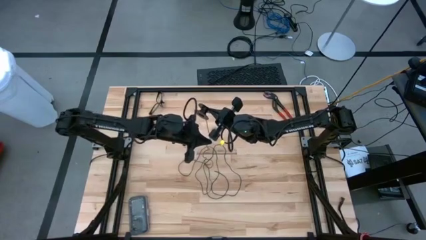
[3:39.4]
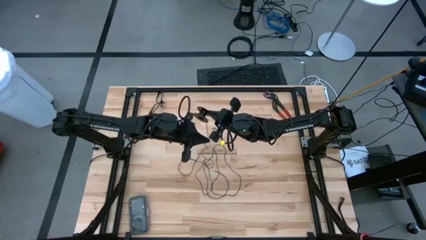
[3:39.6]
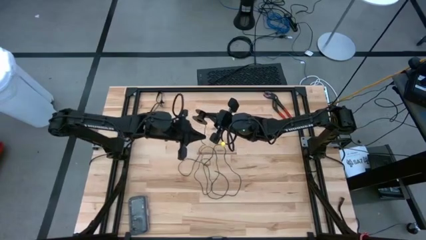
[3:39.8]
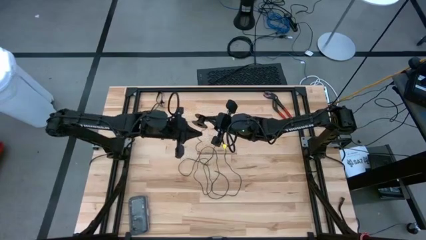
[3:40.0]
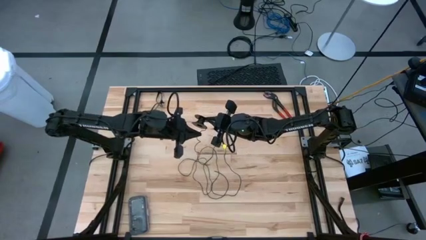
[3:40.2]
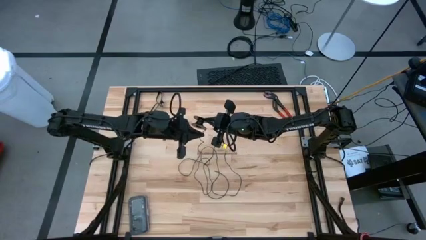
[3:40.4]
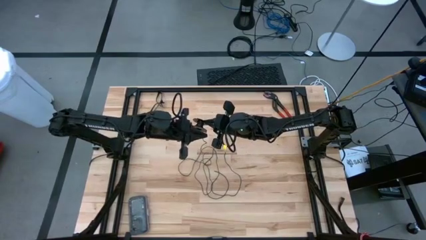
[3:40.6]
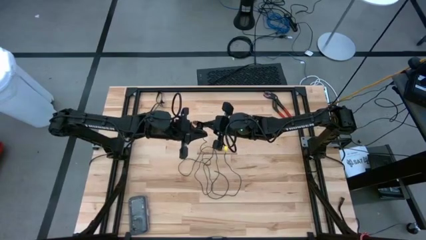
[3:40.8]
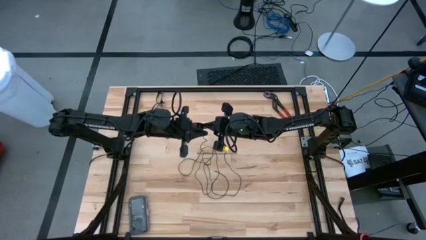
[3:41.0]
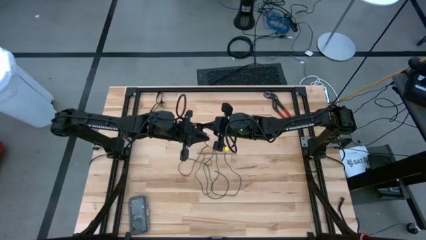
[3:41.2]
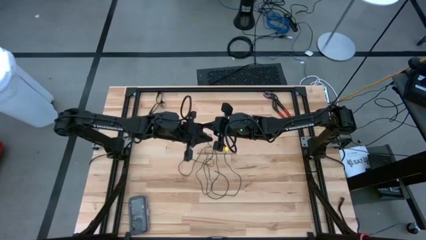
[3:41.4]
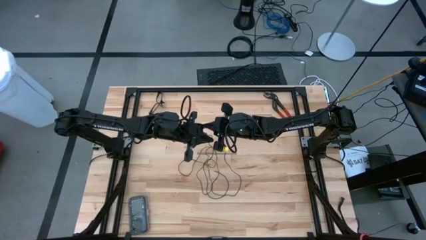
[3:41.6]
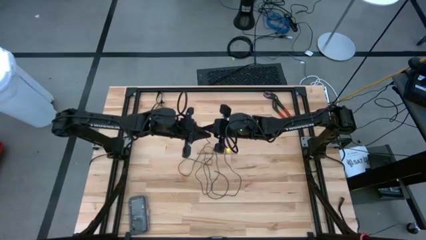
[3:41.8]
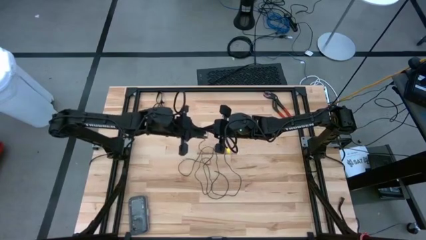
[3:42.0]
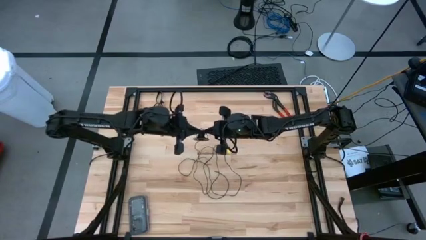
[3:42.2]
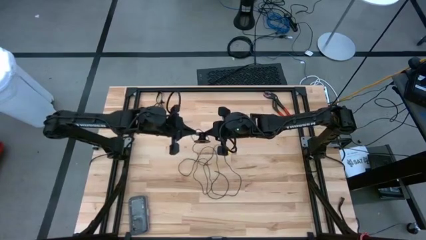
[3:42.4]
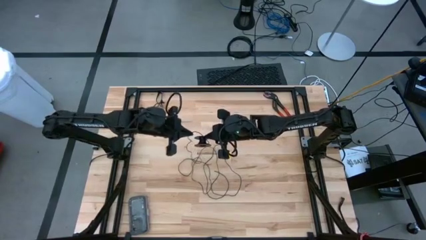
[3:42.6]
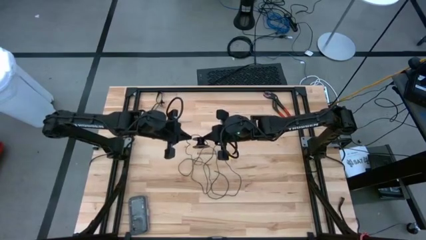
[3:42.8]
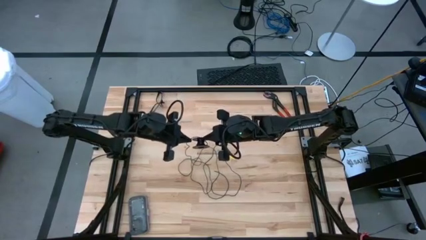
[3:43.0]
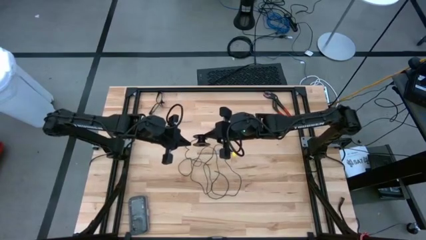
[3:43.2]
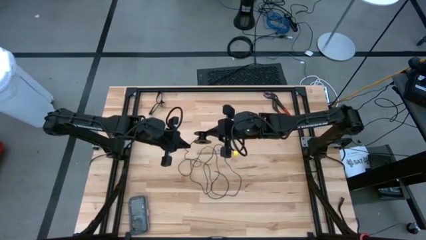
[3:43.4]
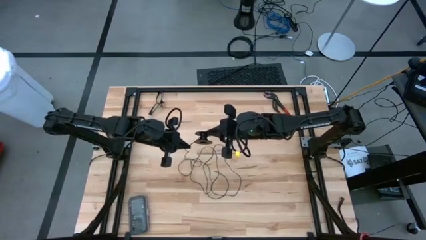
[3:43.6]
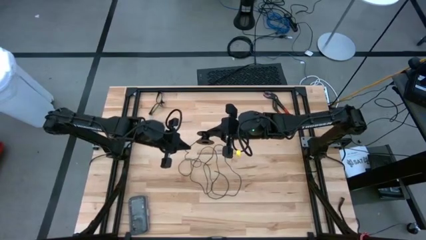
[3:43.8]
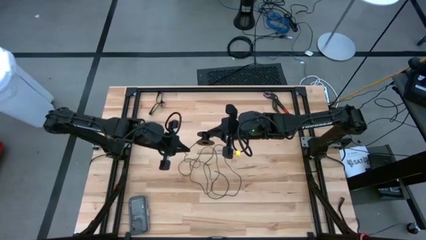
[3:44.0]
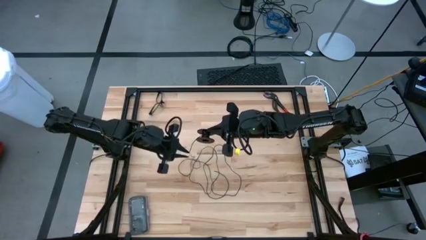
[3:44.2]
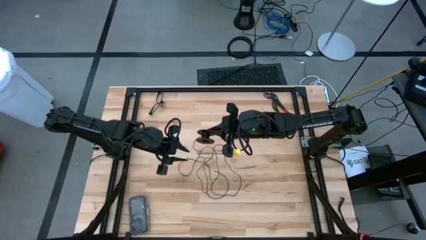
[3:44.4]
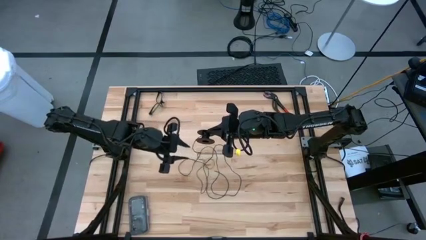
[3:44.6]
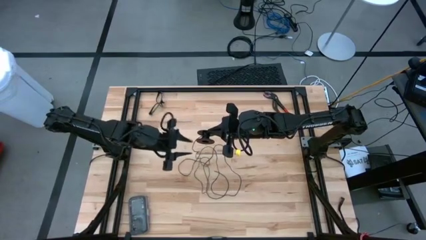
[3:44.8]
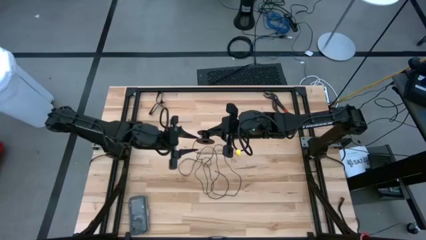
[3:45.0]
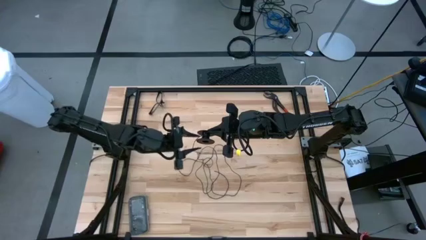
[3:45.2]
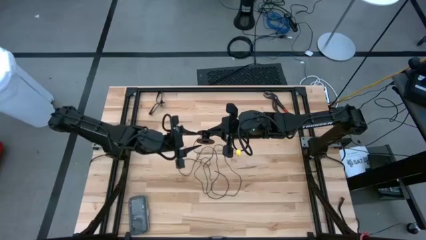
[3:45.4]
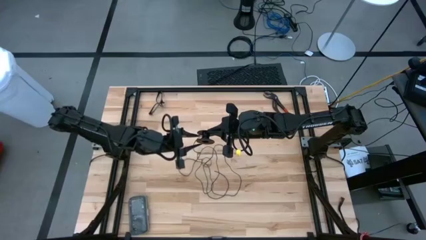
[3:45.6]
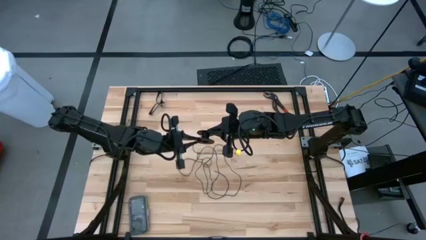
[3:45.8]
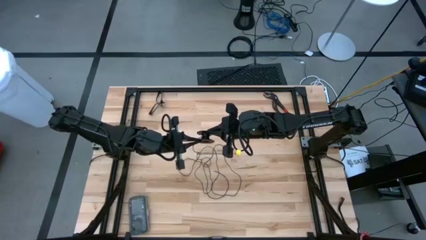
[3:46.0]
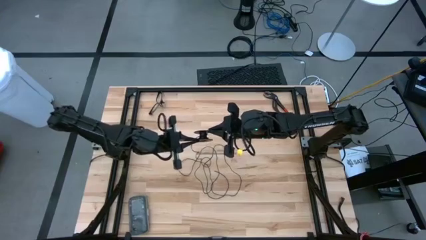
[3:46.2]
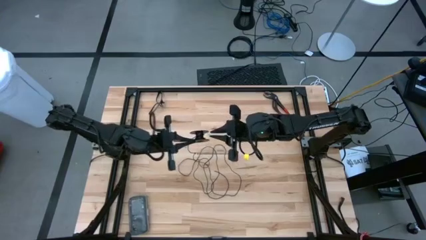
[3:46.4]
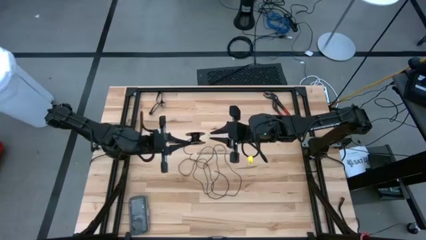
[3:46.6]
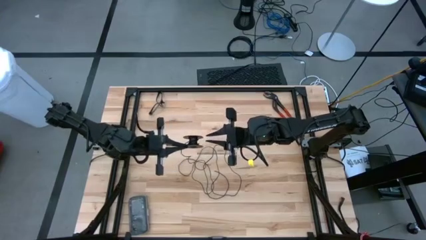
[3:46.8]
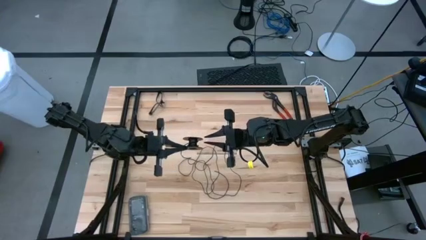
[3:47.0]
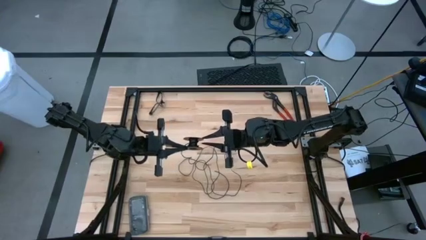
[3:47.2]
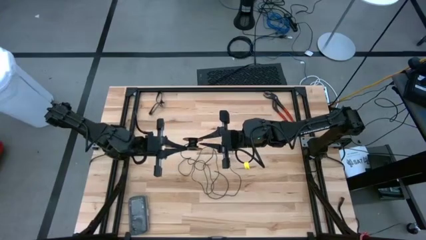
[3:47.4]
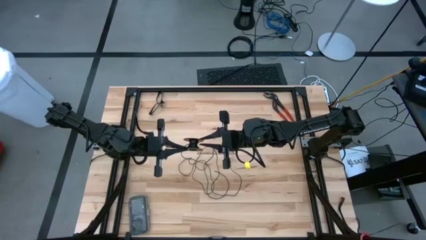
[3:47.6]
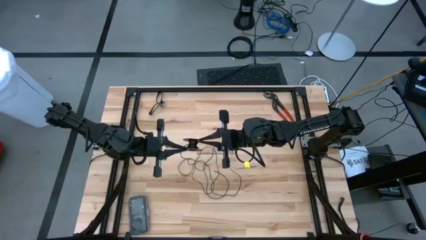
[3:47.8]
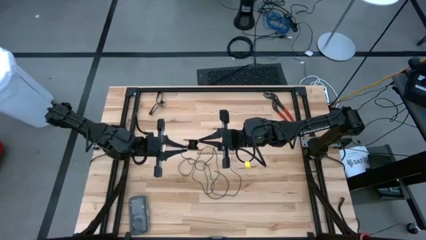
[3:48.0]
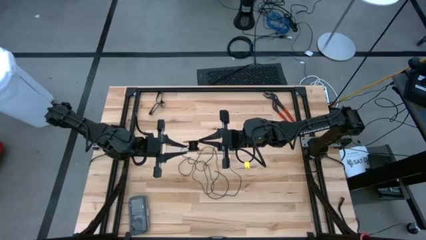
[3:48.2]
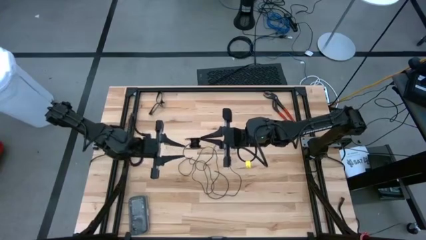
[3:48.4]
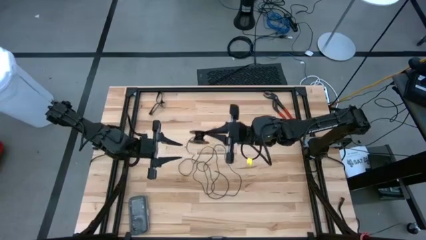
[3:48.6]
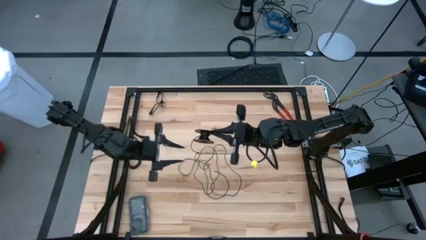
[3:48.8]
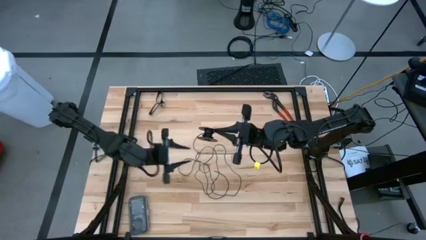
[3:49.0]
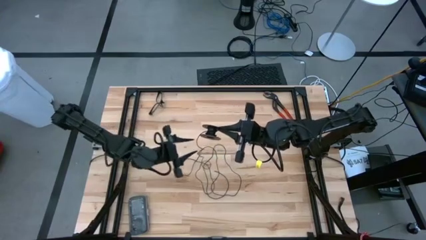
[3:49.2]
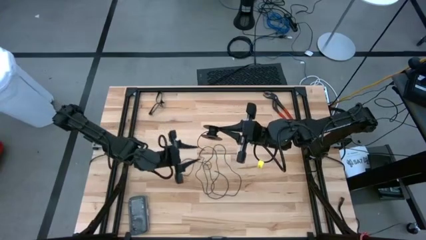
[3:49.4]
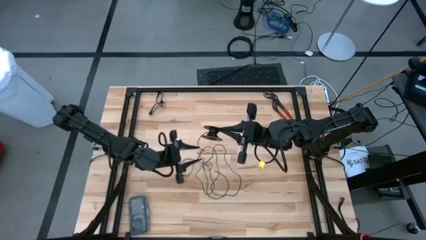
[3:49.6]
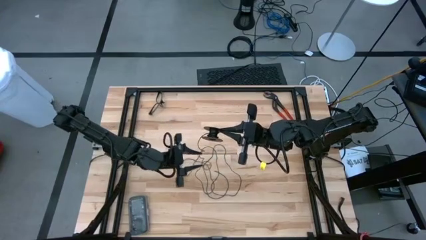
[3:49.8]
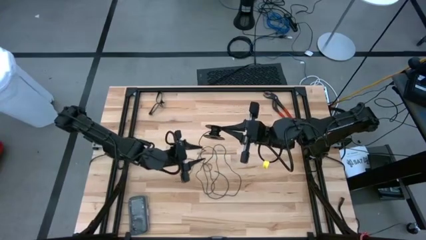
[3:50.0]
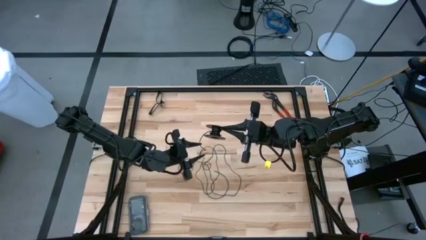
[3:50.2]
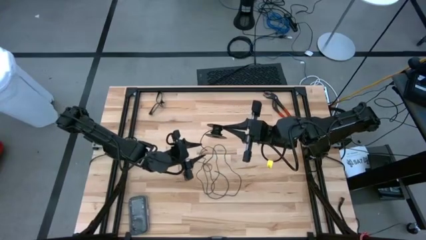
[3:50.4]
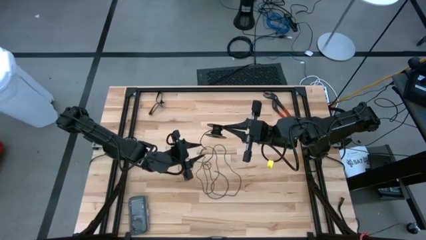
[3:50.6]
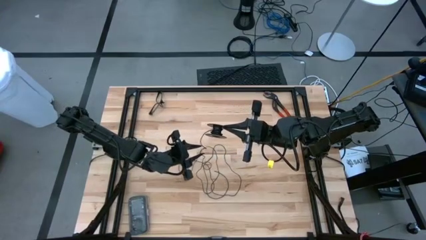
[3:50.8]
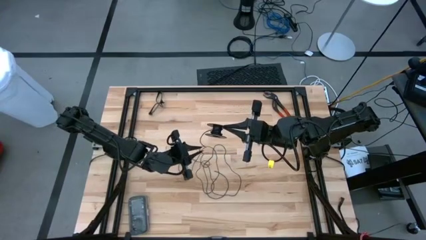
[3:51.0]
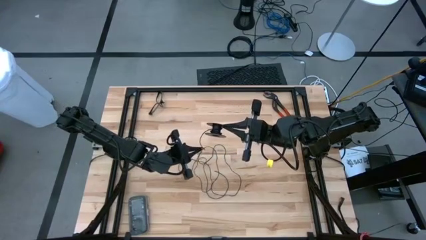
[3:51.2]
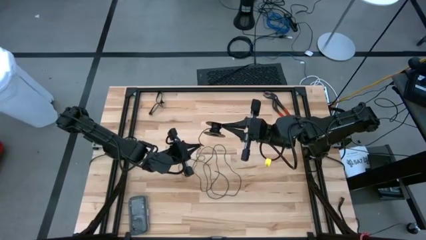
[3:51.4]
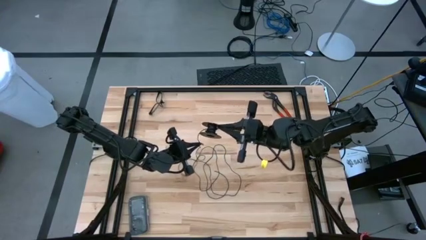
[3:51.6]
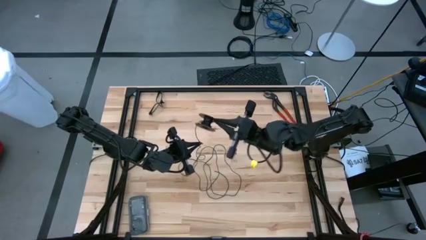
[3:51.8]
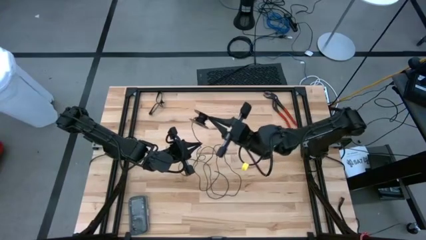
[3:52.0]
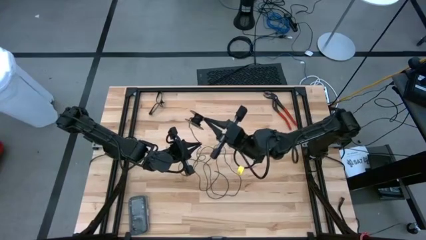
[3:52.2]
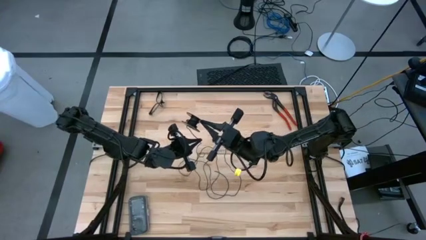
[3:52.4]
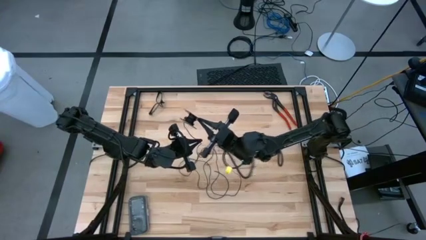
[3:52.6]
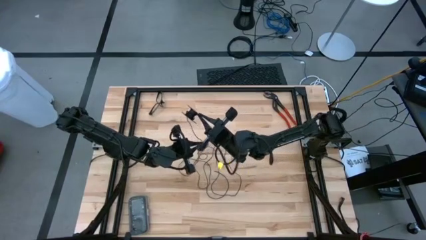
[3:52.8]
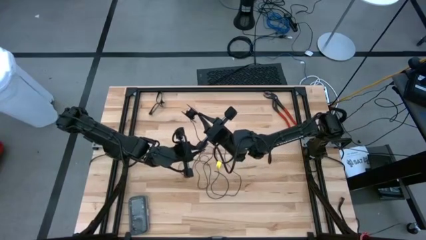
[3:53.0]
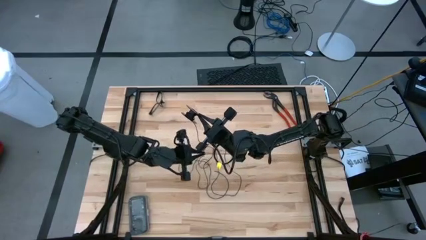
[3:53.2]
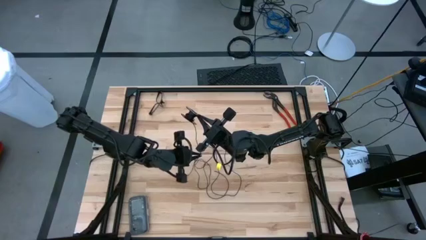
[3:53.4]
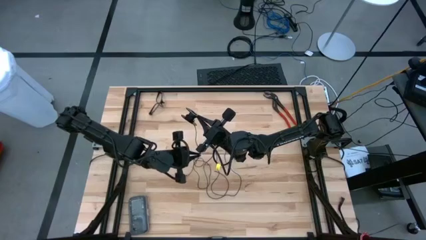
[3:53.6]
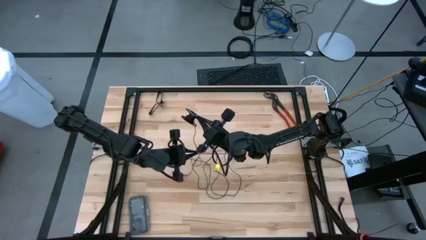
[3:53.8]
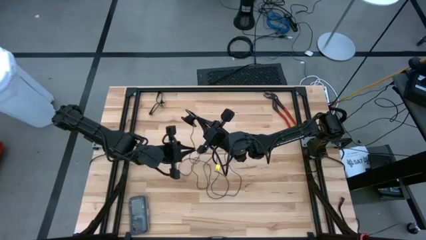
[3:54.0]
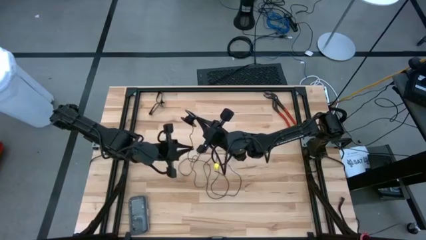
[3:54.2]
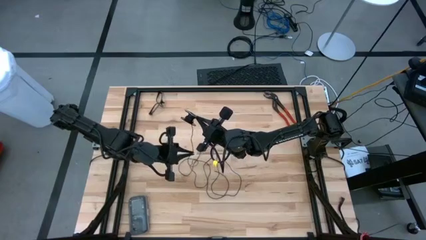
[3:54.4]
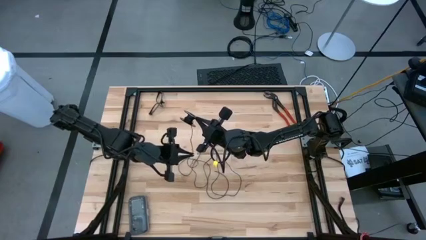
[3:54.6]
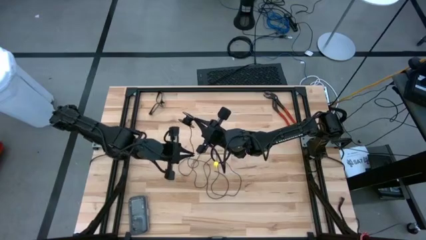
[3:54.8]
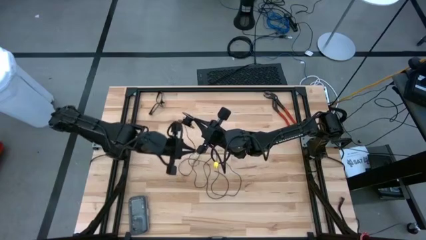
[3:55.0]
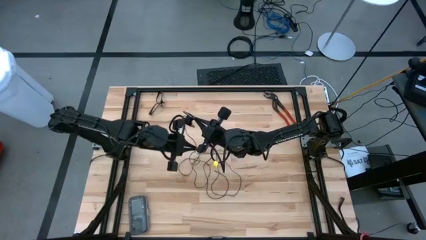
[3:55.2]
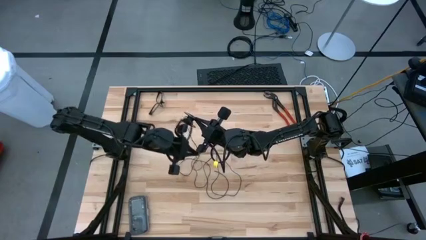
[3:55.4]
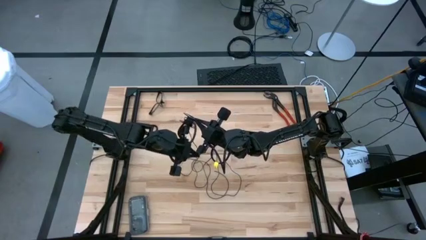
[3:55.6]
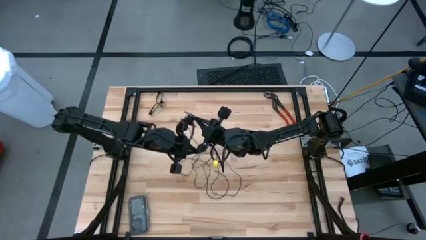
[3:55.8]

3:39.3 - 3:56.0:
Task: Coil cords
Coil the black wire onto the spool

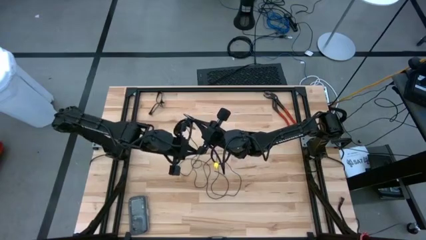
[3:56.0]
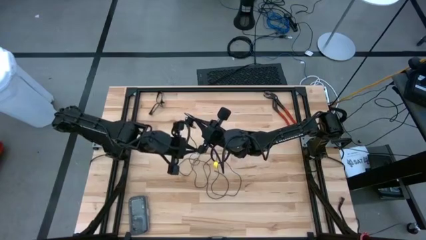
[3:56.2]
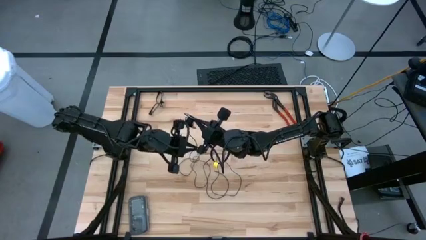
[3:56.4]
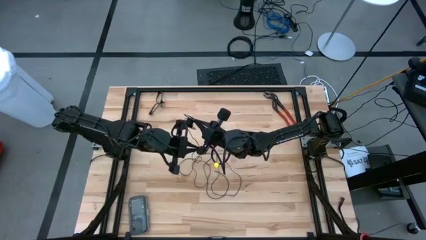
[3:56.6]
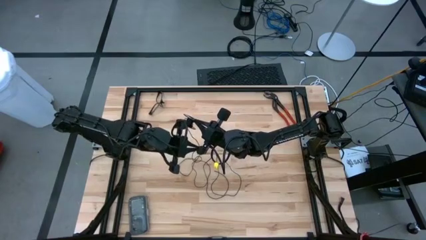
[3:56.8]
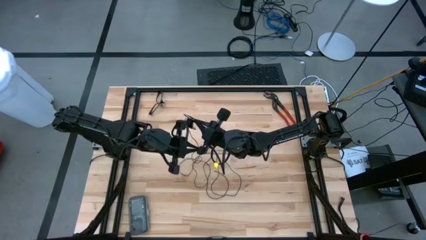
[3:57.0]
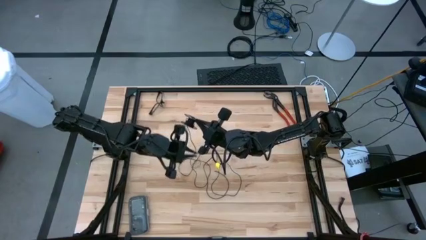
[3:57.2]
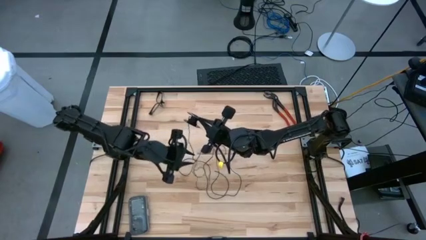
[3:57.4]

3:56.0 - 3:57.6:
Coil the black wire onto the spool
